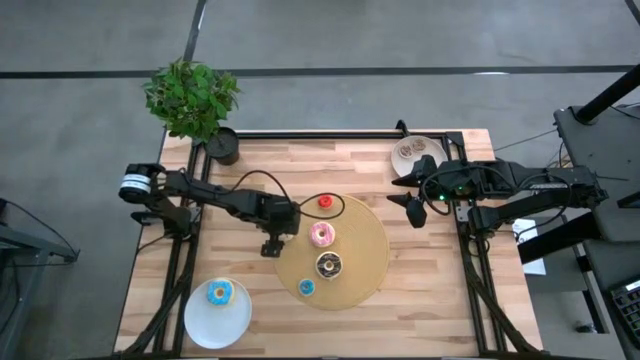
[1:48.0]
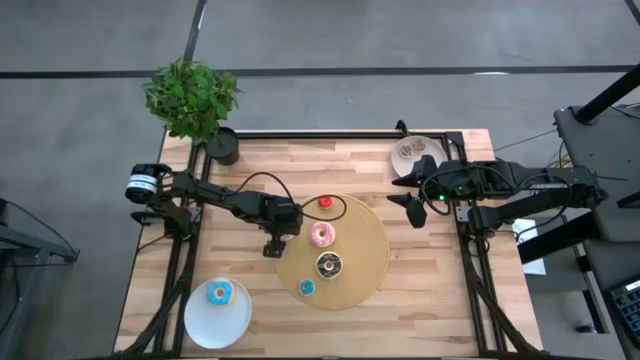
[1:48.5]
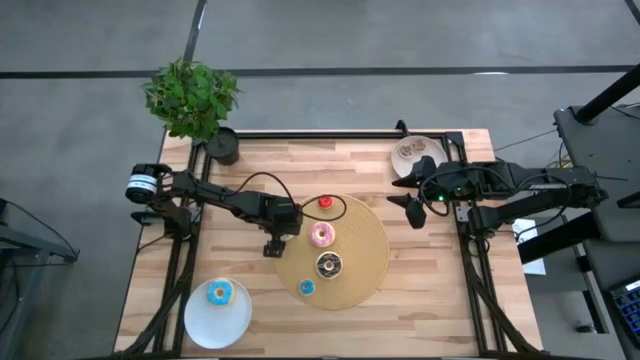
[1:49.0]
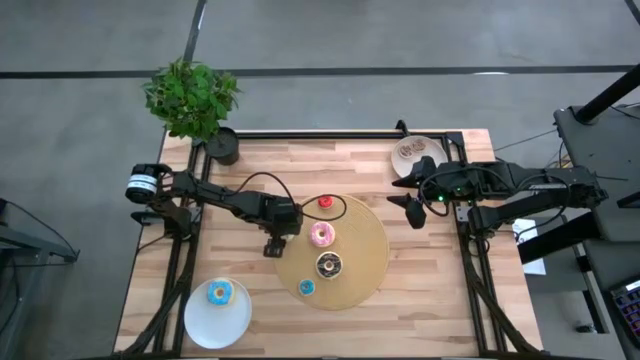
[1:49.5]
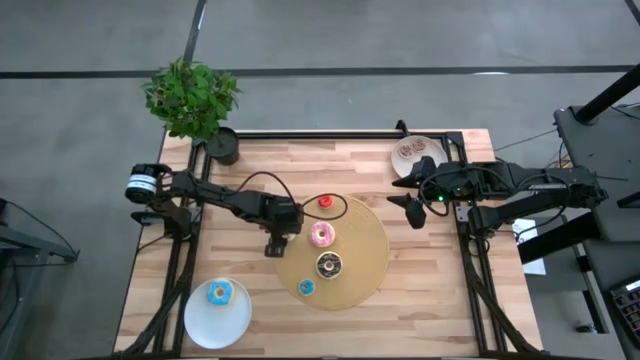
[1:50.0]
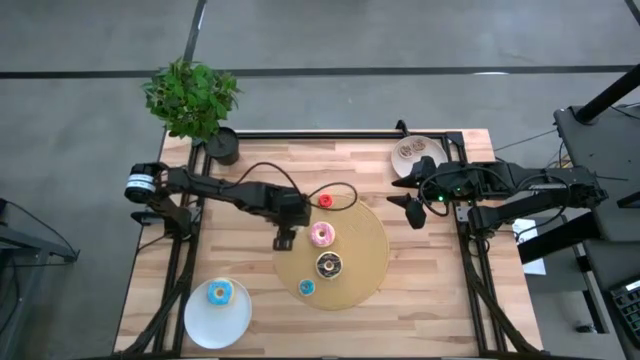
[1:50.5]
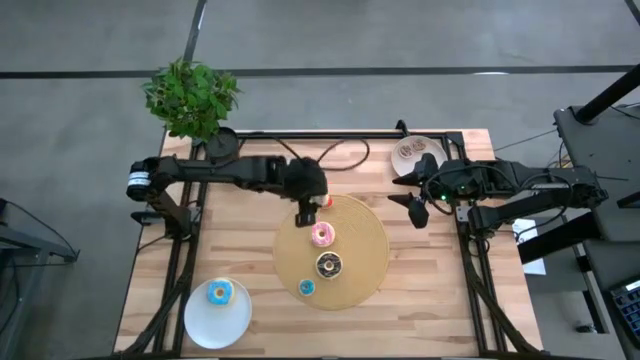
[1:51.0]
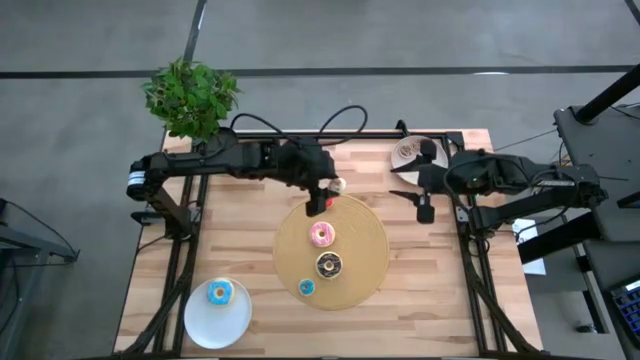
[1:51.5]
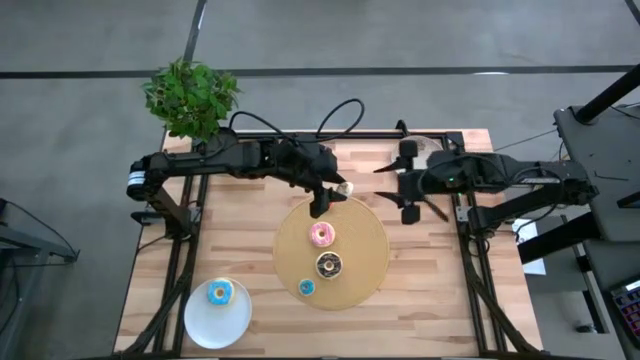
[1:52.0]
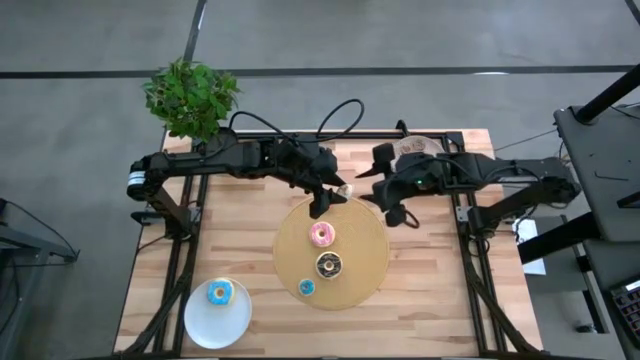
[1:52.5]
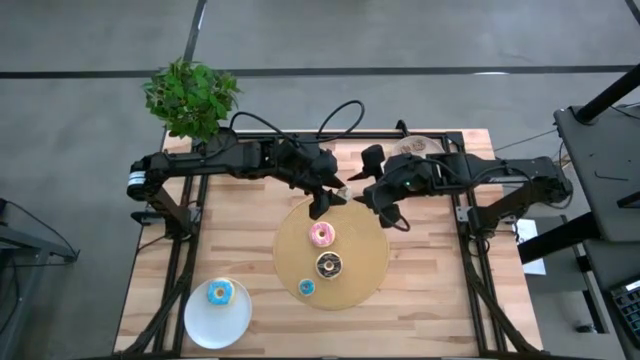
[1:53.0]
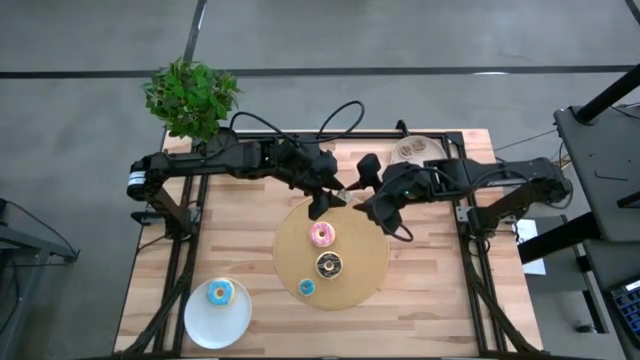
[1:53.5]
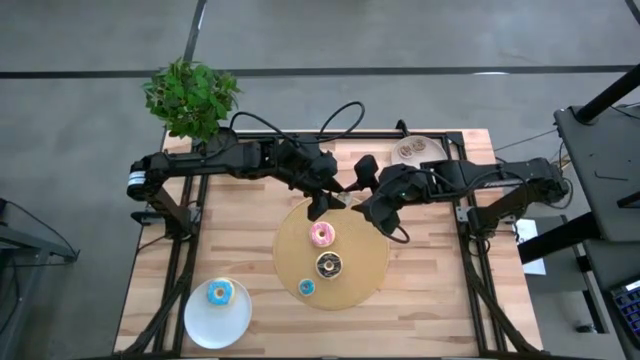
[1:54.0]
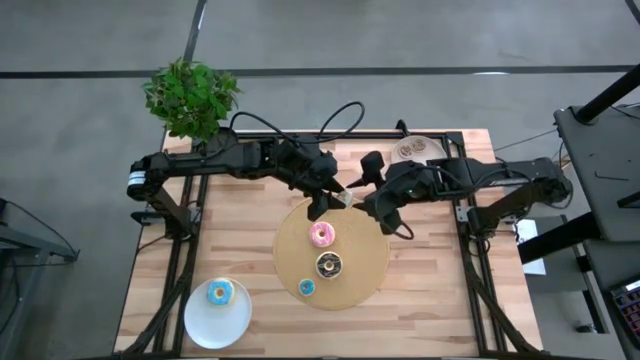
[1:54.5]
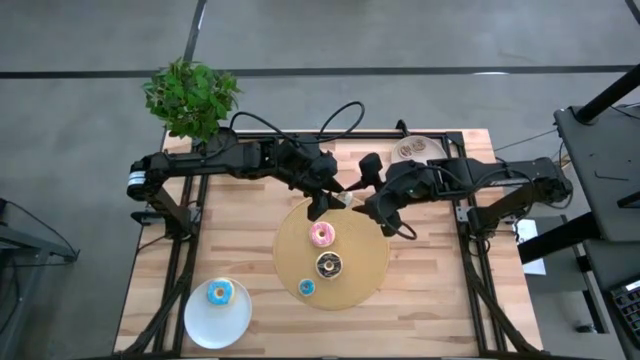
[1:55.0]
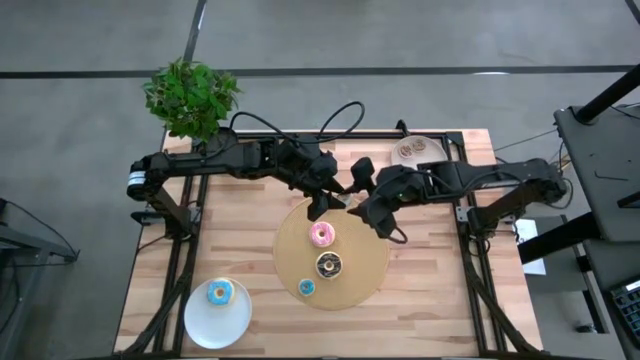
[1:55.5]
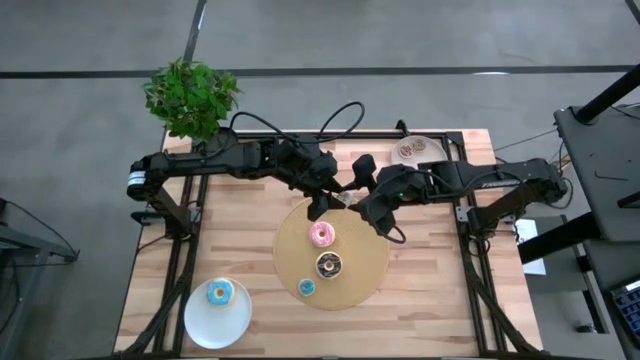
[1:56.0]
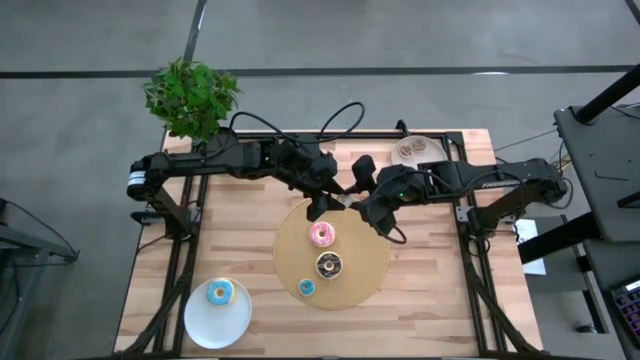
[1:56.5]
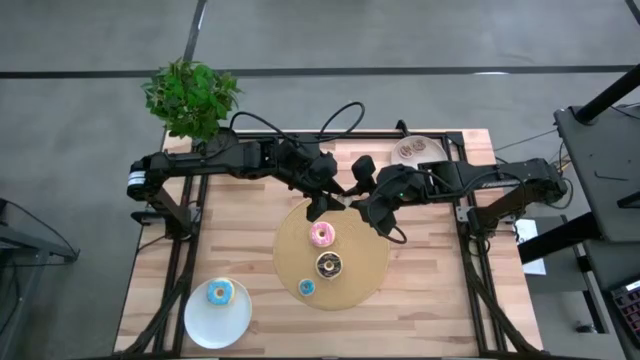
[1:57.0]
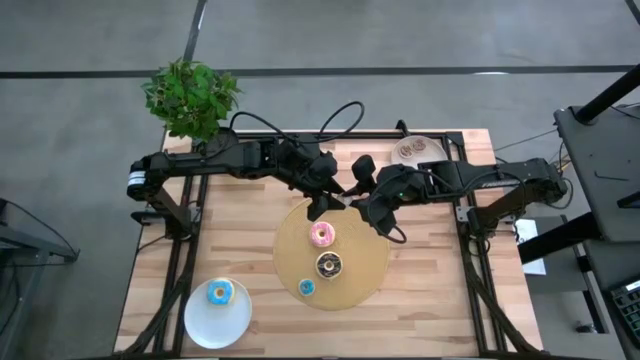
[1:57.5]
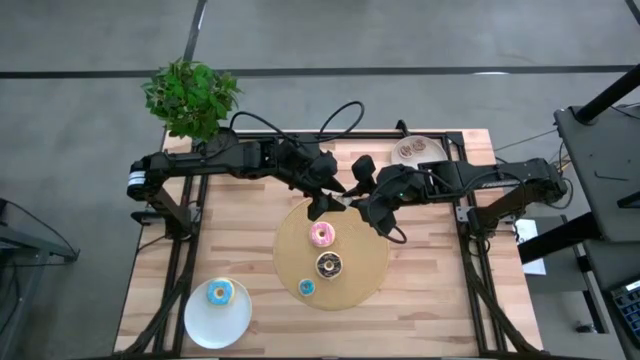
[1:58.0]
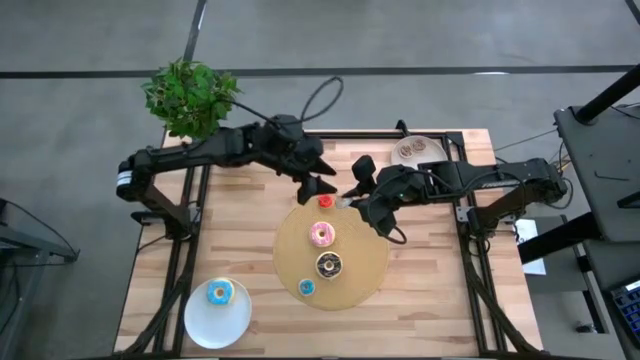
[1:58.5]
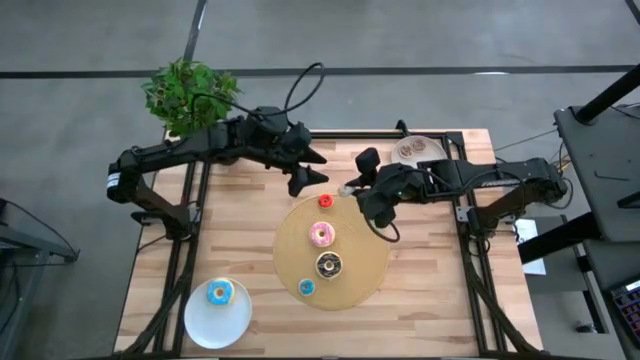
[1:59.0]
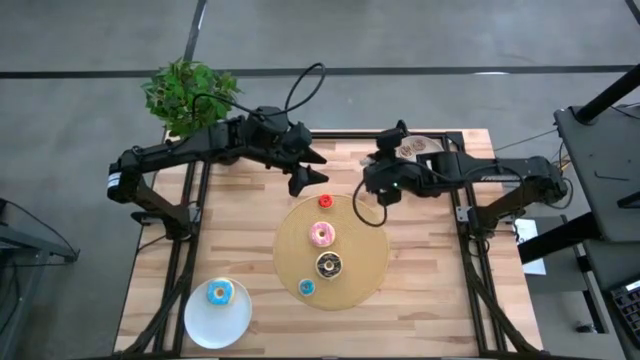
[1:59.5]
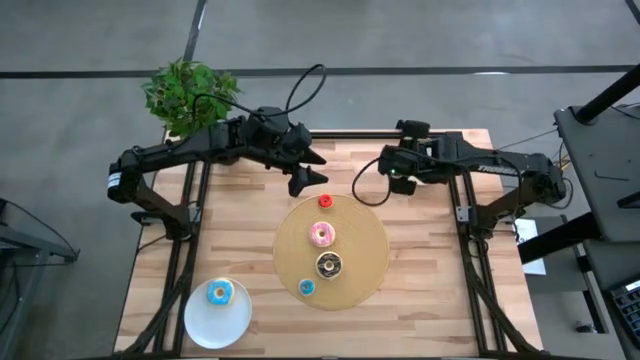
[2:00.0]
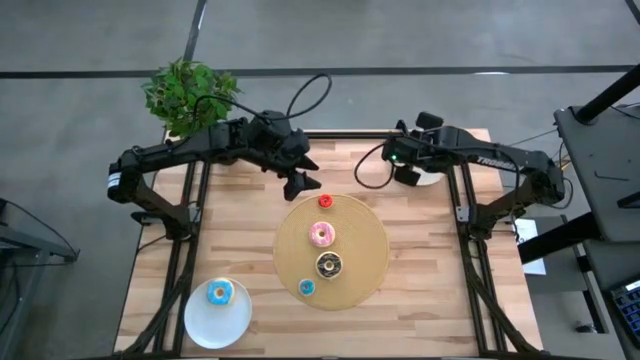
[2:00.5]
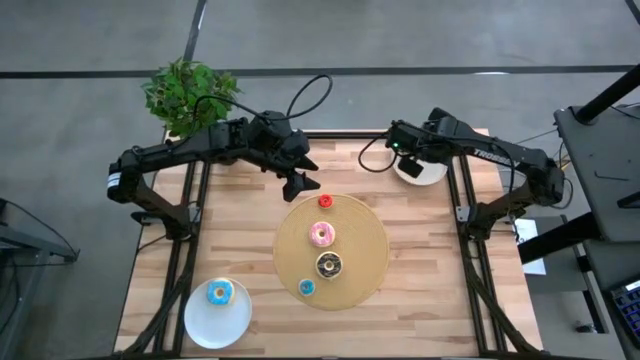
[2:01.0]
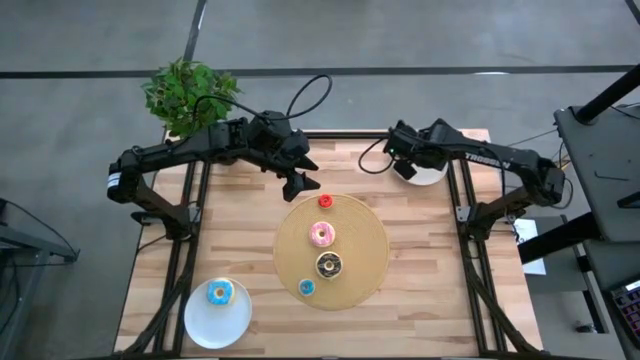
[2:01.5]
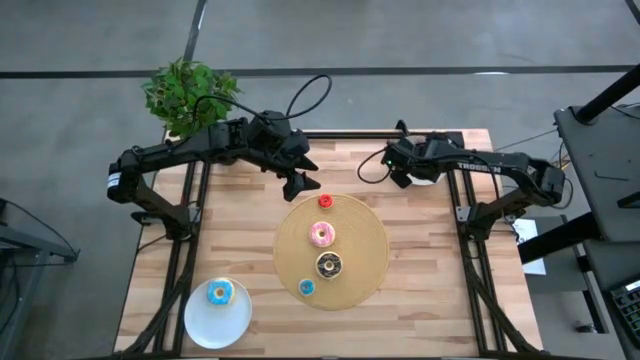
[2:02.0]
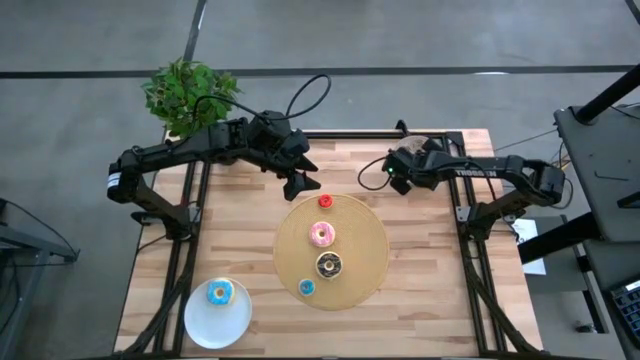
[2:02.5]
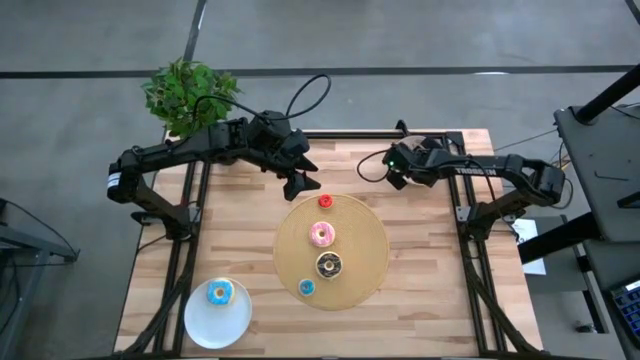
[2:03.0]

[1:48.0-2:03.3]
Task: Pick & Place donuts
Put the small white donut on the gray plate

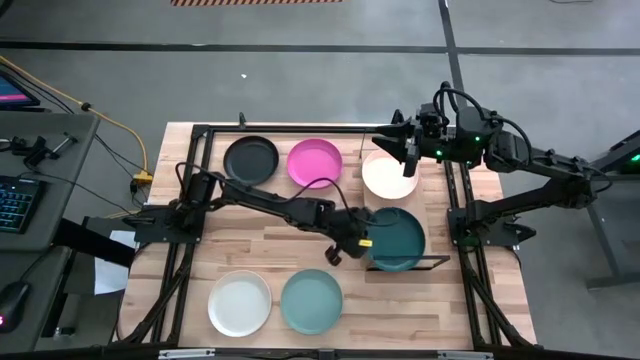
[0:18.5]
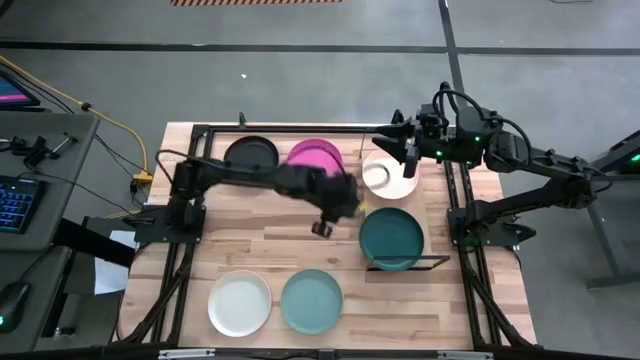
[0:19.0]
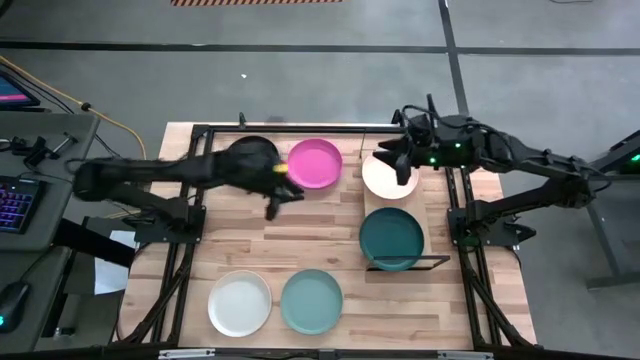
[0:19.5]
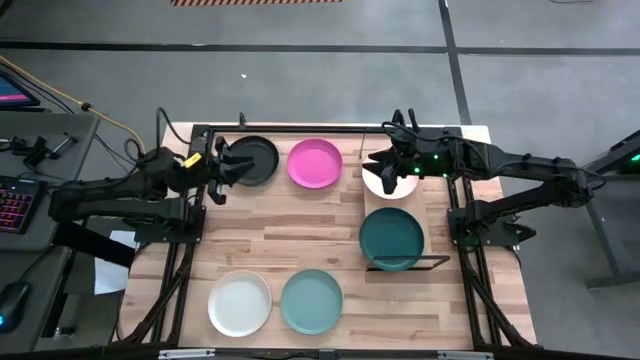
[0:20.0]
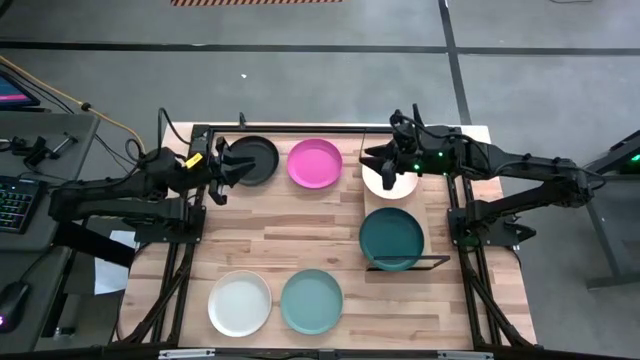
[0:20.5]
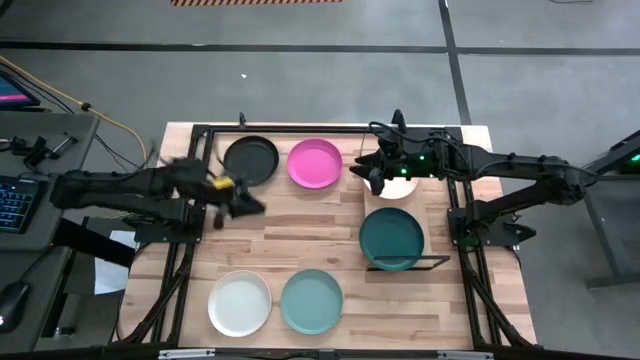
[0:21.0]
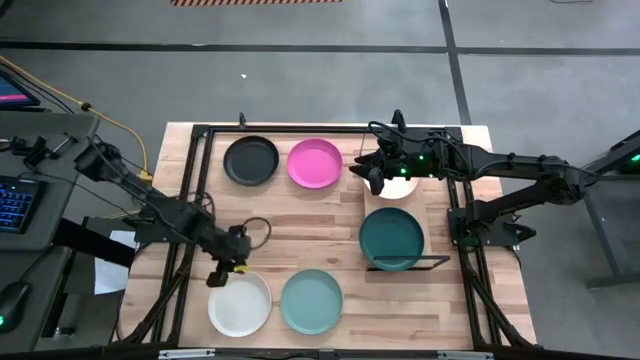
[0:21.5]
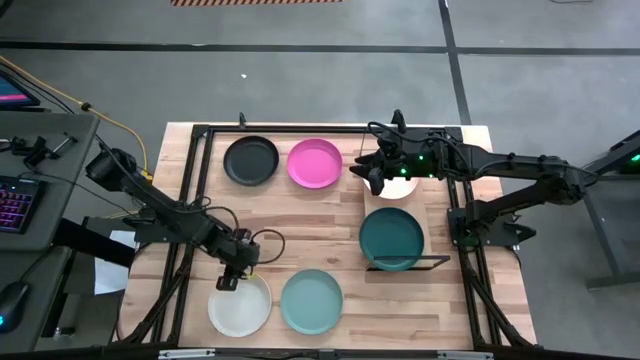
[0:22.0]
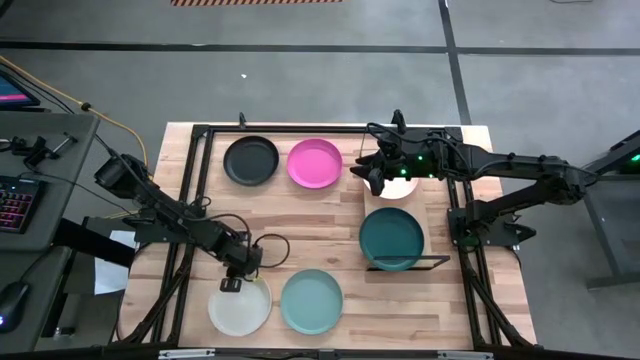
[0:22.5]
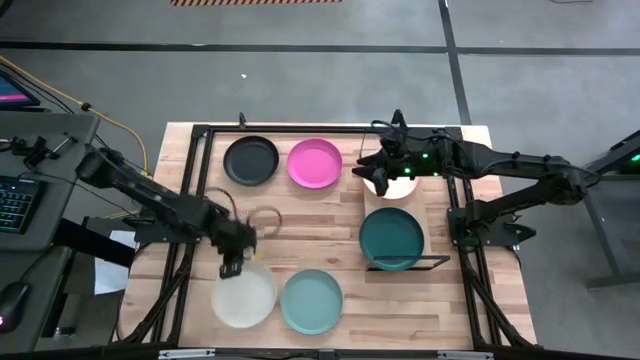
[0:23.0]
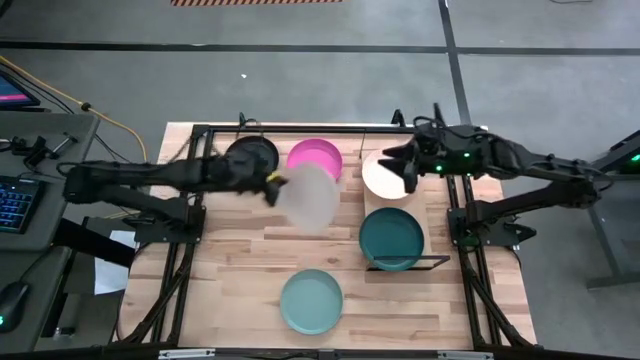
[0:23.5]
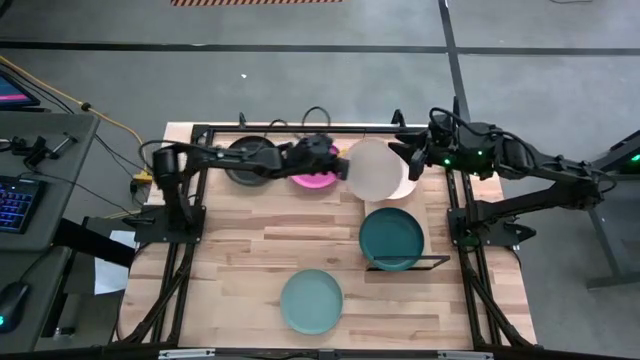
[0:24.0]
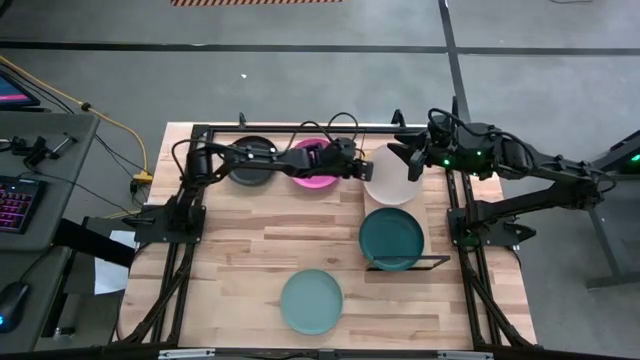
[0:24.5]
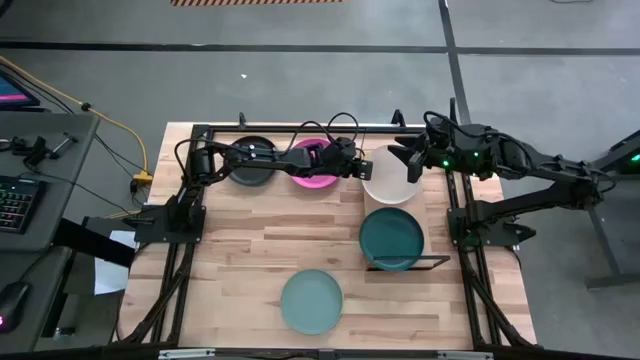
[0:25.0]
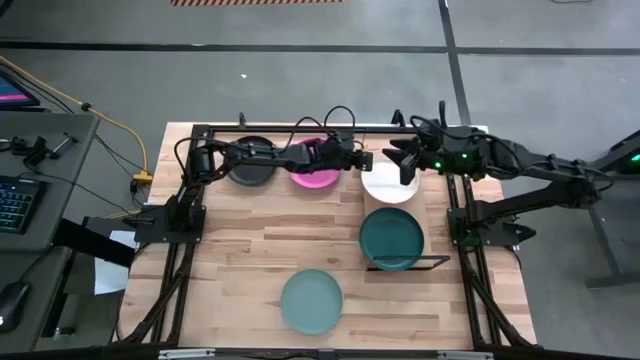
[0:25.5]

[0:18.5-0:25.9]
Task: Place and stack plates onto a shelf
Stack the white plate on top of the light red plate
